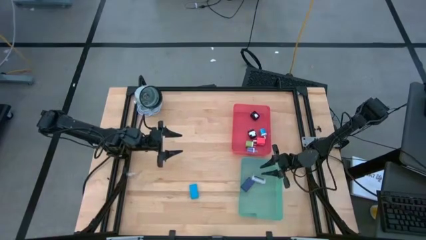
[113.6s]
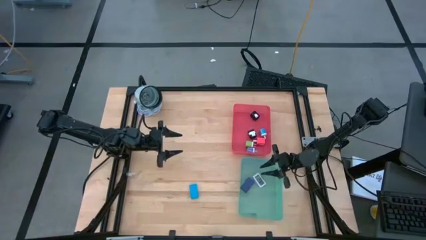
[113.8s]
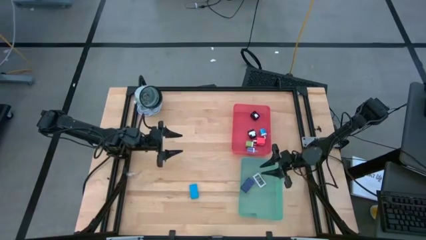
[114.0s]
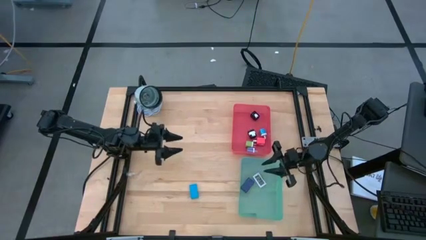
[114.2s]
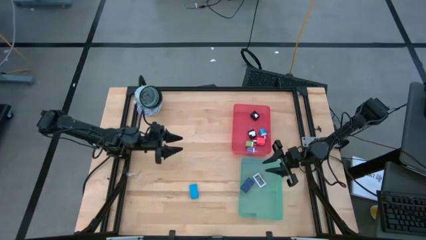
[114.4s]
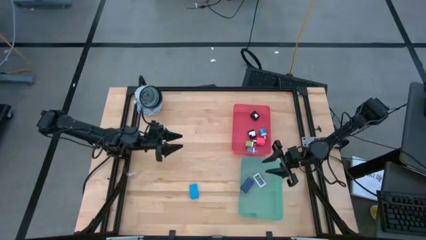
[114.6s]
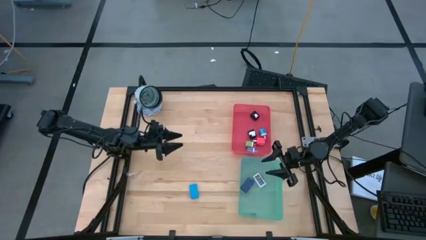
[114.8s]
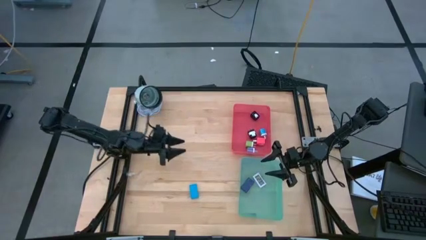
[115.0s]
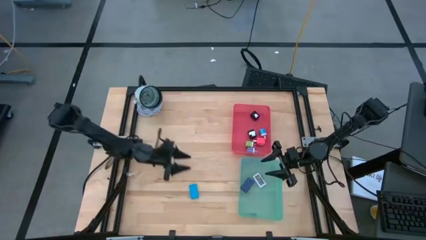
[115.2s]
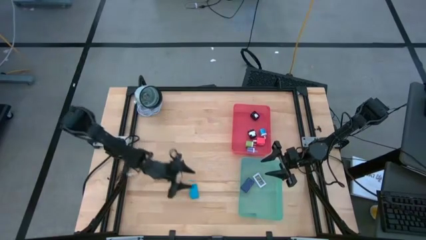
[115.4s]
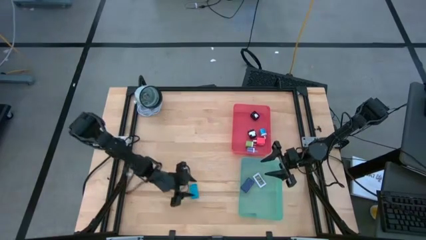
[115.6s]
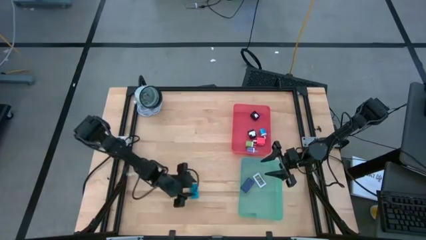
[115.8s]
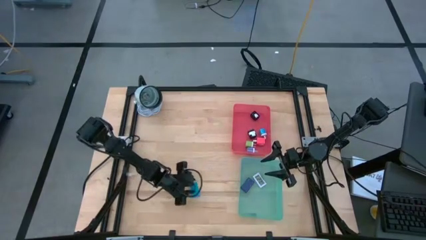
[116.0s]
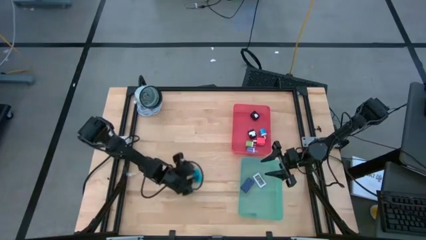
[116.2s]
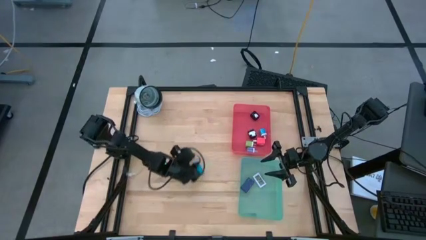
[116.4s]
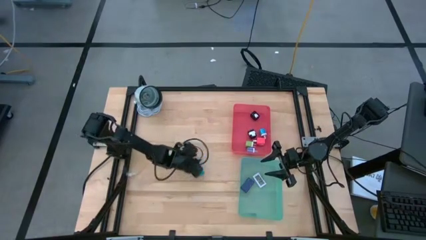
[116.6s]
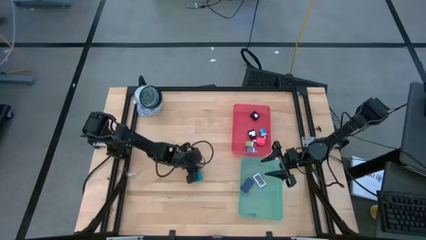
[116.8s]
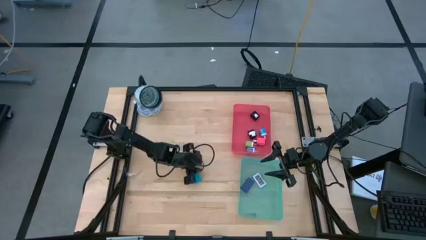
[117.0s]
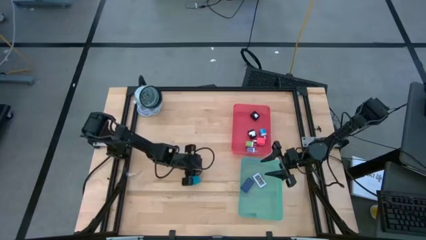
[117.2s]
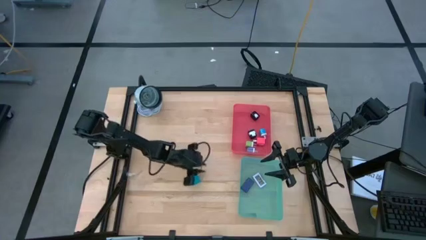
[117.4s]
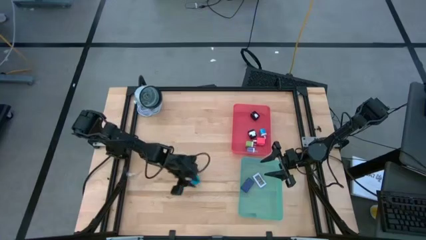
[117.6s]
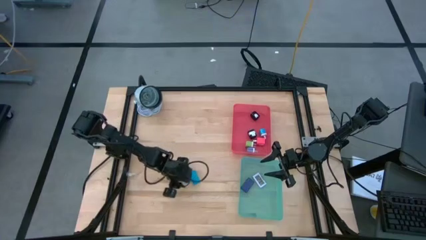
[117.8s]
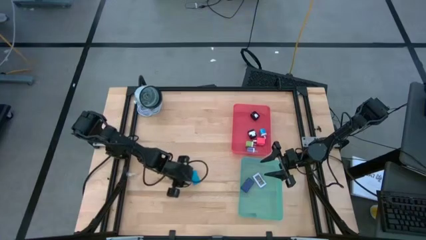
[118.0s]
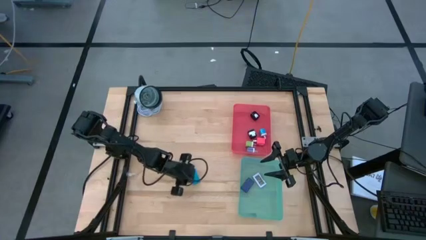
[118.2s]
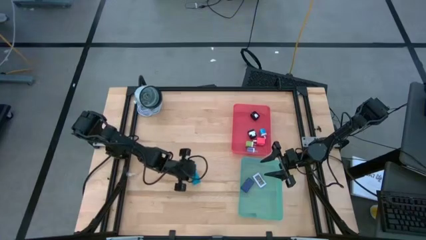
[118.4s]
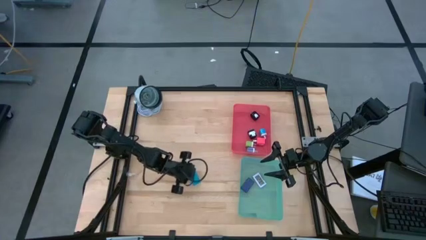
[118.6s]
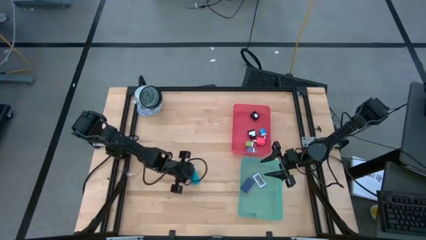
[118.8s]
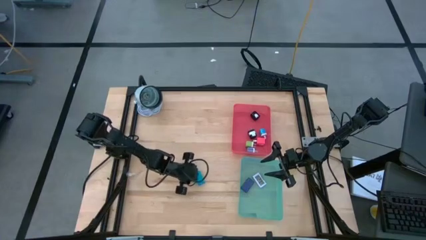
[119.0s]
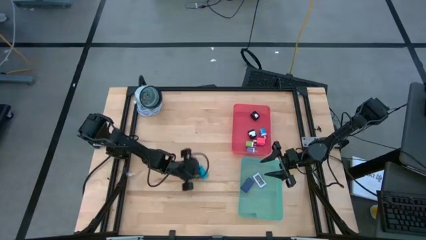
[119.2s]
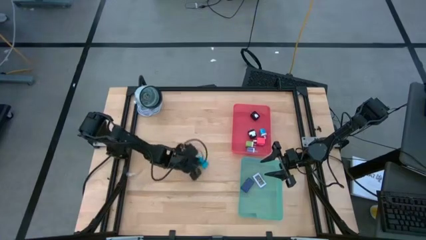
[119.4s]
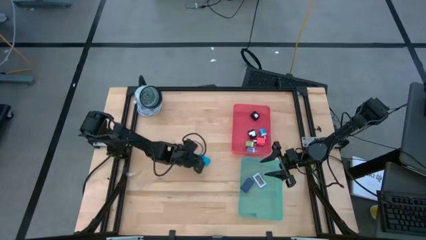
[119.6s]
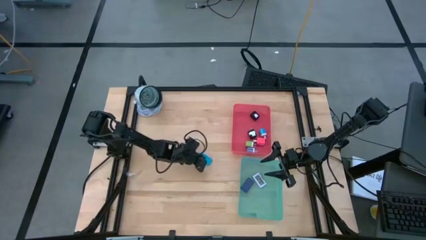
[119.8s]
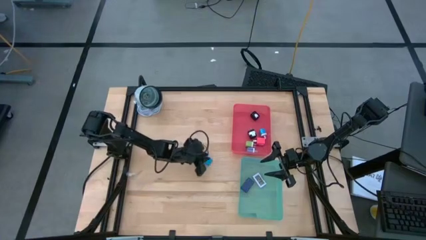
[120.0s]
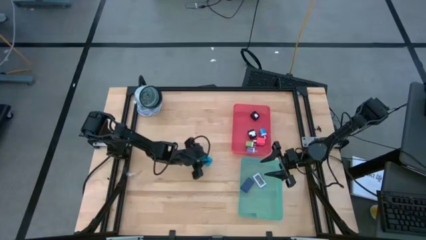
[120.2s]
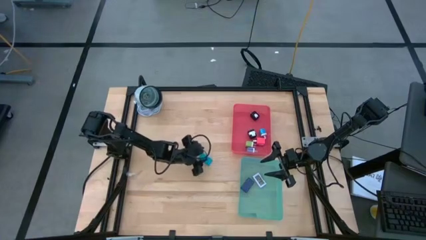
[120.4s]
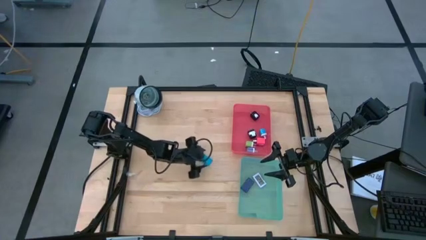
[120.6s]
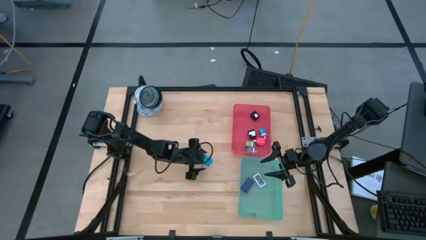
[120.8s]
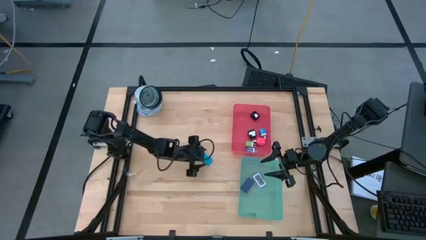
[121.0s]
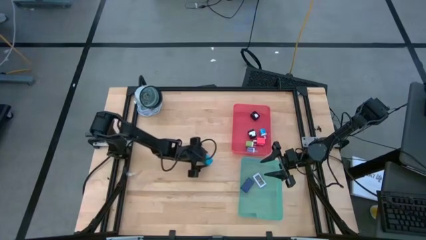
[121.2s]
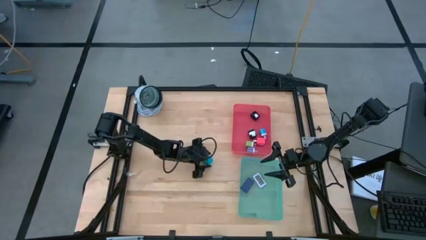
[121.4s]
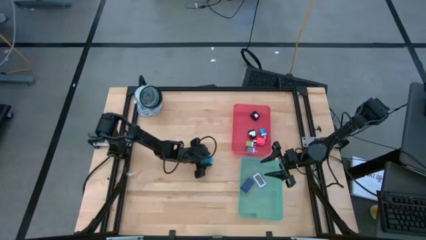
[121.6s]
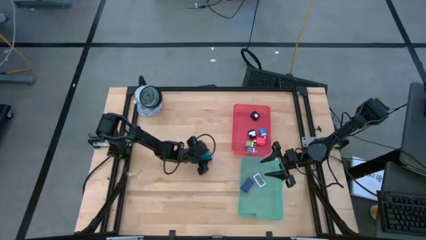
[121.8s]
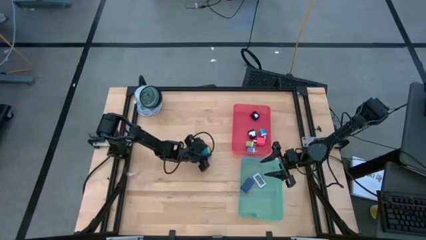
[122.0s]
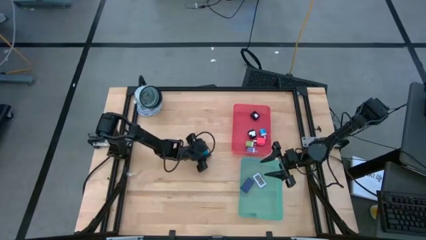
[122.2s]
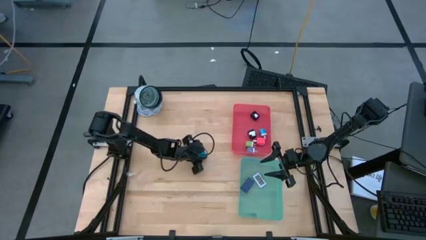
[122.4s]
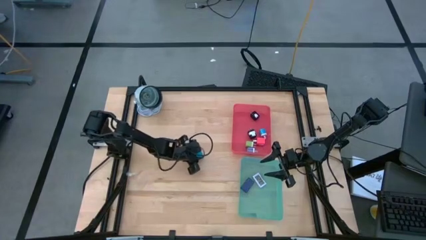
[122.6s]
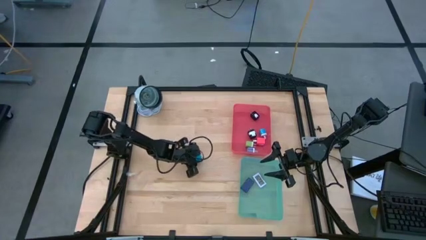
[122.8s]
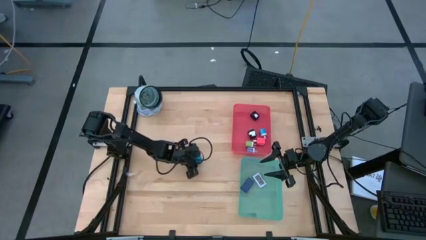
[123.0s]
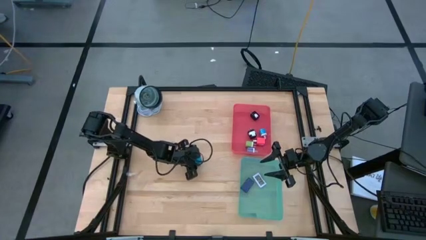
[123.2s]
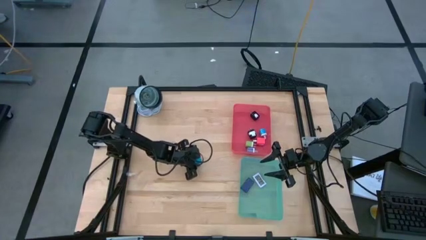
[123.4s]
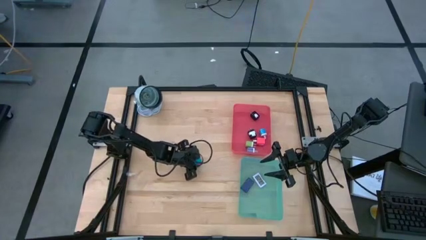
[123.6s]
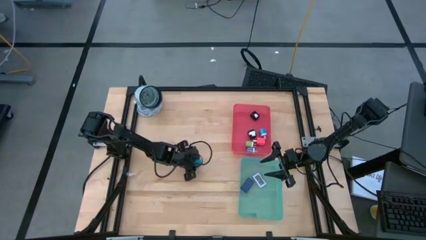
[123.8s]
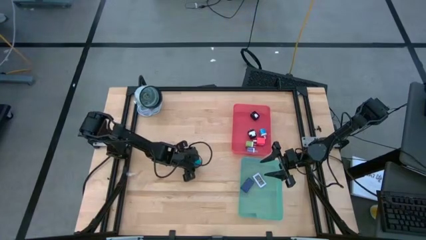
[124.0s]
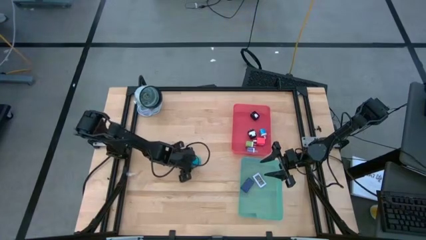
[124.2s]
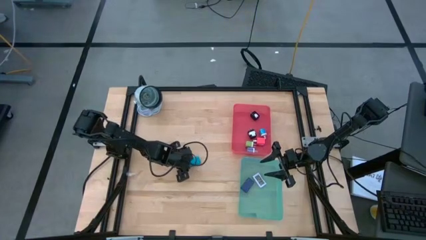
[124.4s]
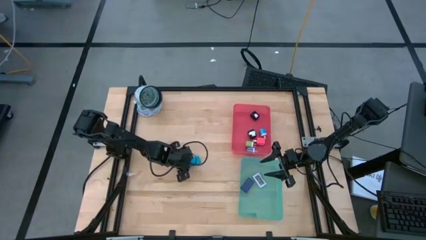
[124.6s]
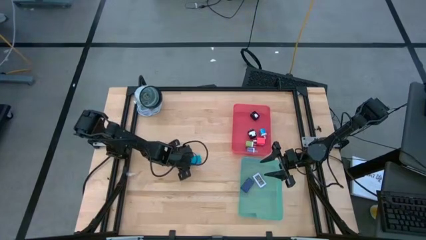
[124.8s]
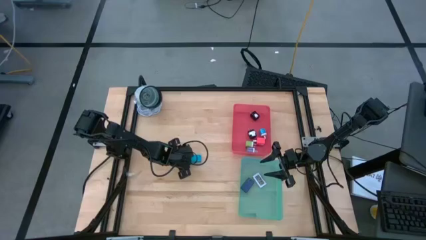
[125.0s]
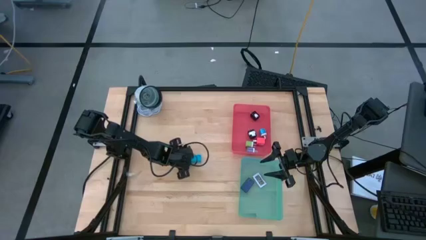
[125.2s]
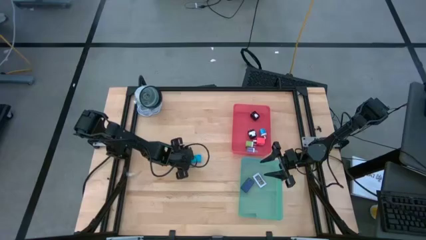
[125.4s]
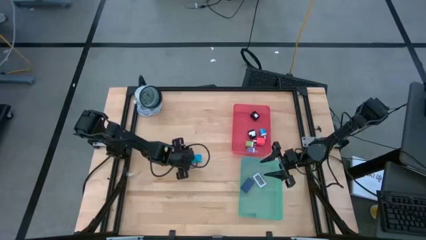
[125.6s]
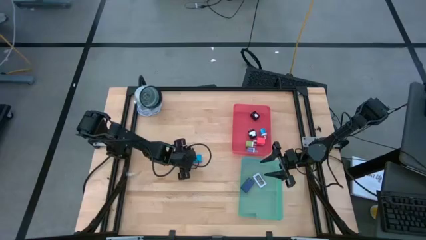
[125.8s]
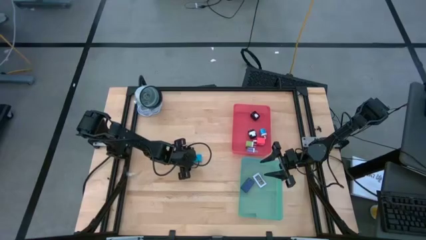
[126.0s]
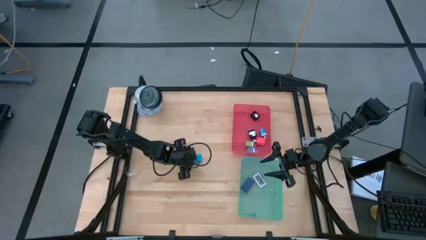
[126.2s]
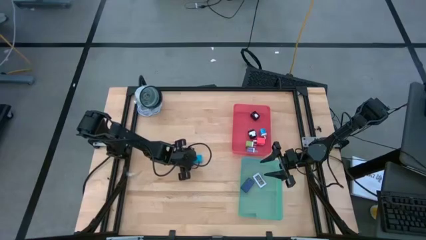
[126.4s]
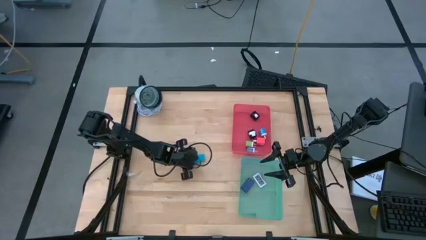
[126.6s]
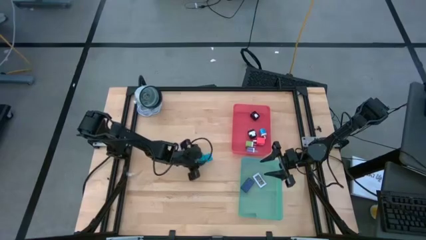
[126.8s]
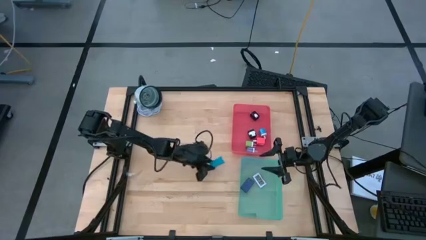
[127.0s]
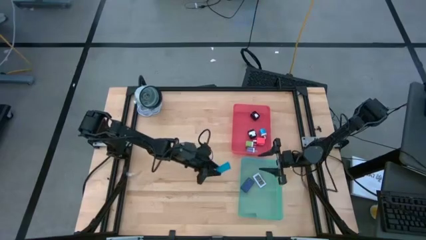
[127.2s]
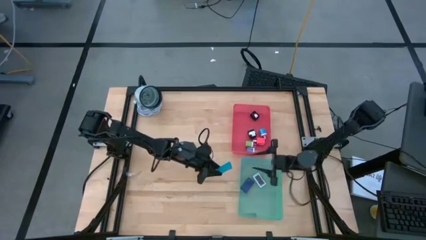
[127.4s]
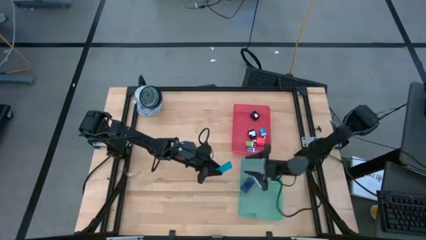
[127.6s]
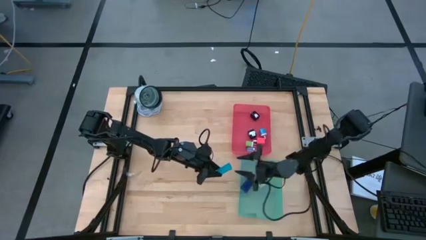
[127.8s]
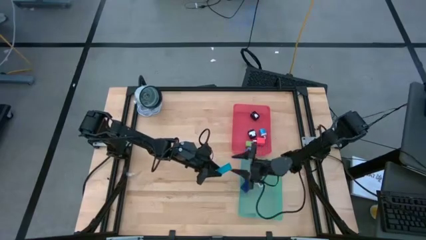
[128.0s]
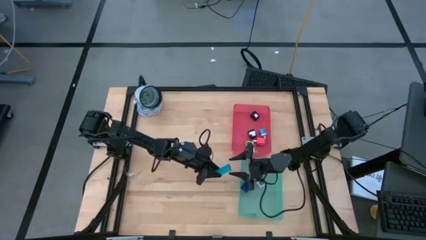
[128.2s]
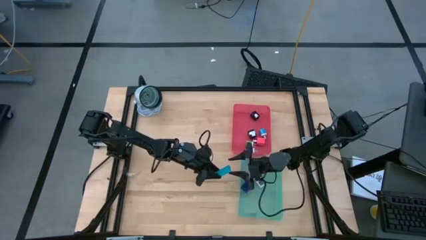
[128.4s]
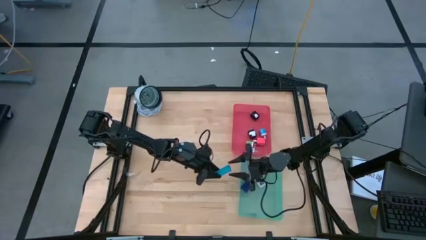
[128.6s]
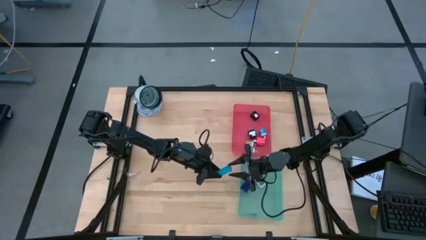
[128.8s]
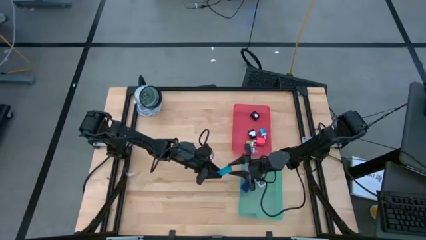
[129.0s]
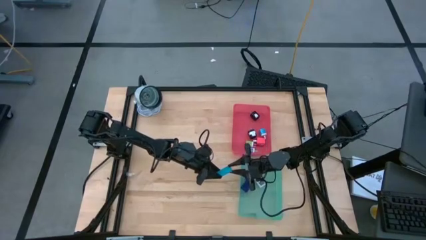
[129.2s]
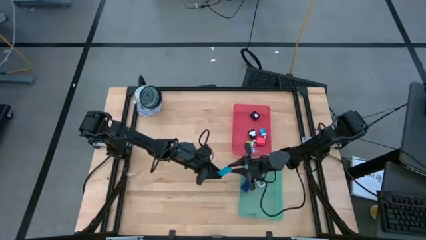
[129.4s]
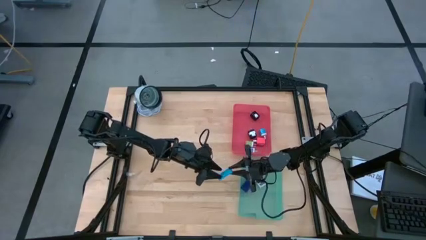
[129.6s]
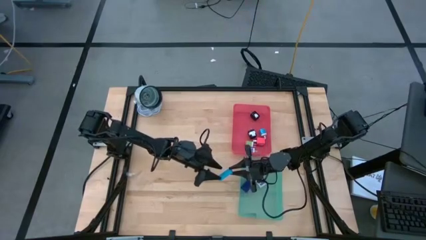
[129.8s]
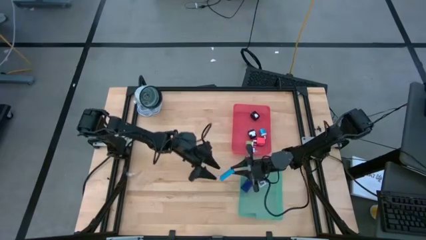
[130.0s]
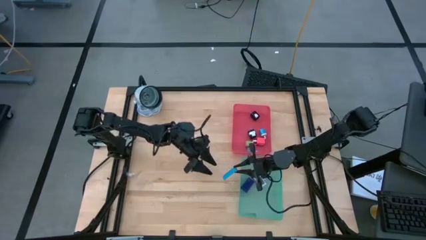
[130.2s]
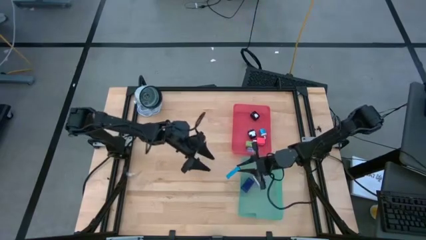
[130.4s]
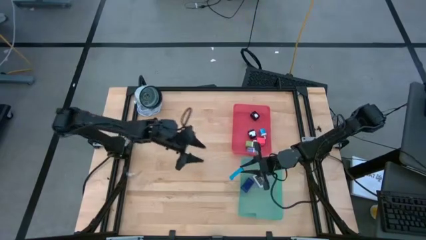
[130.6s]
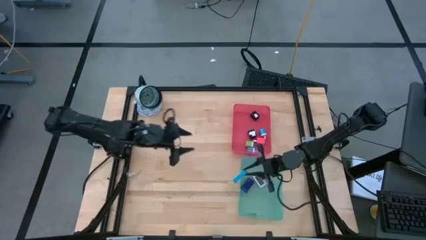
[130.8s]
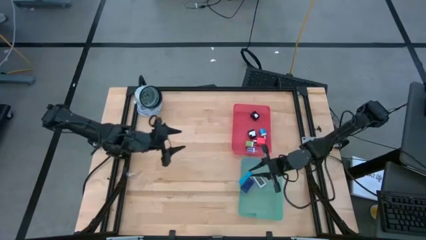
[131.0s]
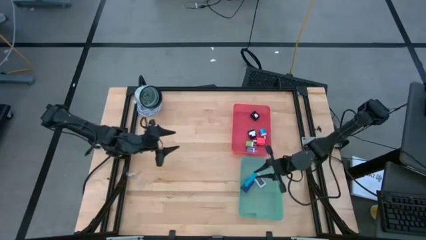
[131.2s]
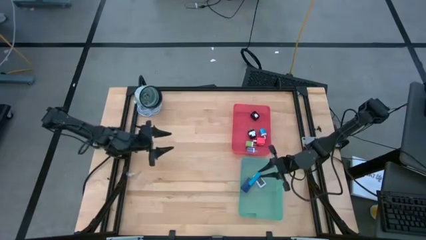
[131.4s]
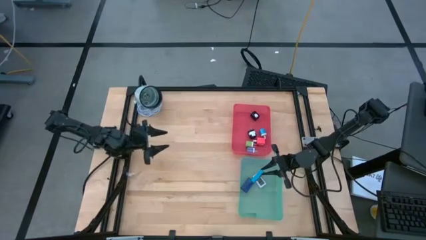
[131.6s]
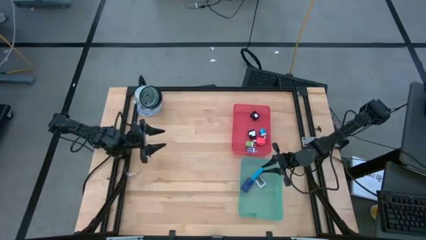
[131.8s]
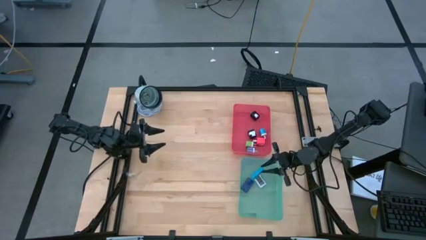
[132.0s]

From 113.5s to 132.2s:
Task: Pick & Place Office items
Put the blue digital clock into the green bin
